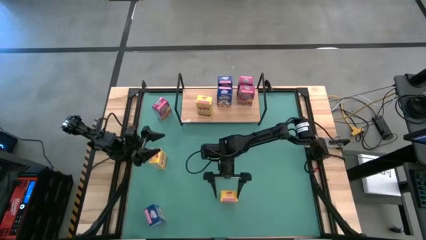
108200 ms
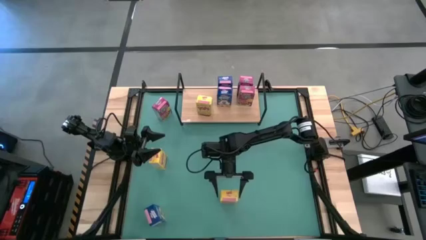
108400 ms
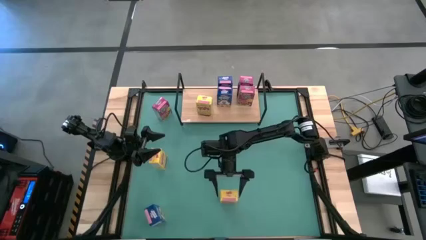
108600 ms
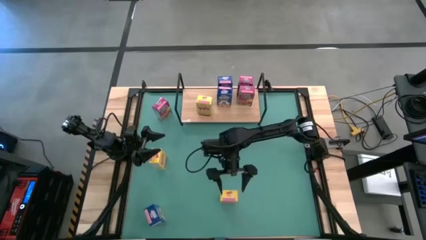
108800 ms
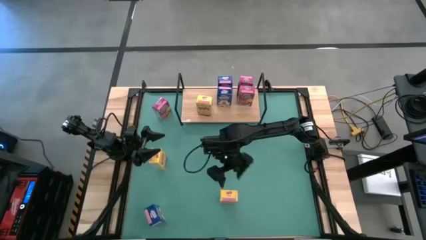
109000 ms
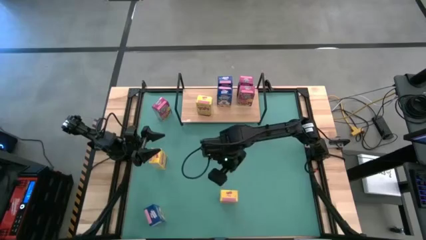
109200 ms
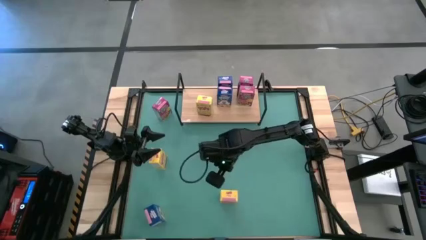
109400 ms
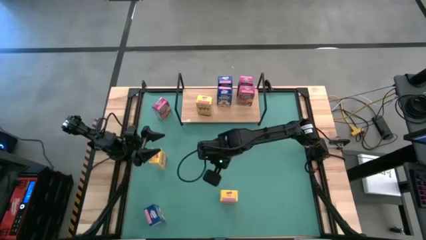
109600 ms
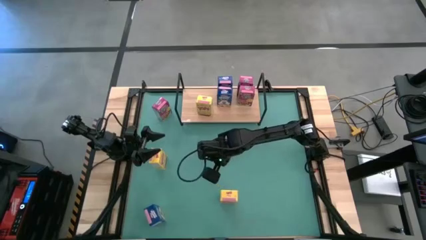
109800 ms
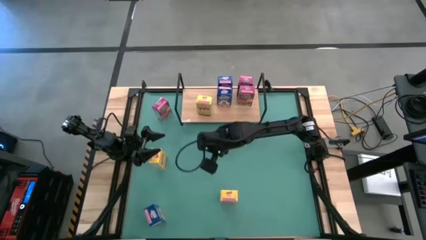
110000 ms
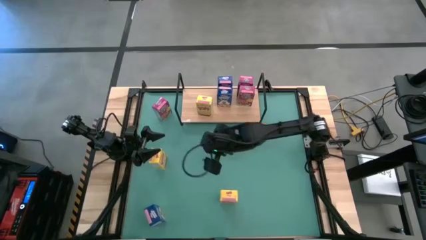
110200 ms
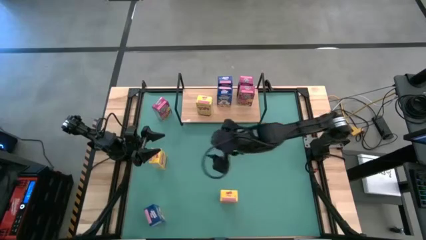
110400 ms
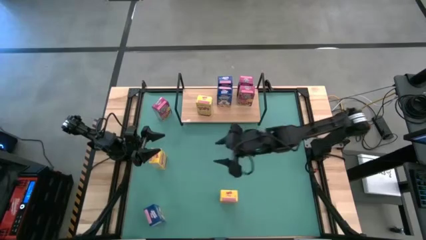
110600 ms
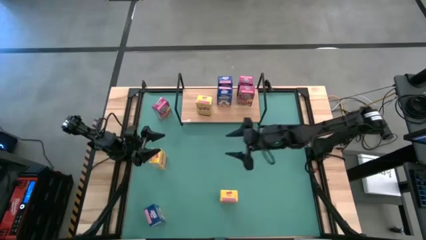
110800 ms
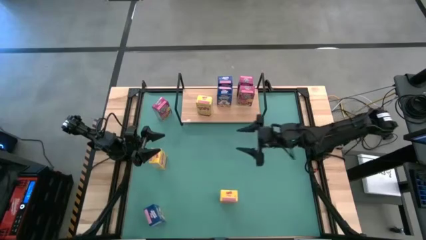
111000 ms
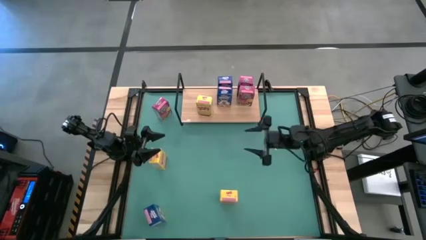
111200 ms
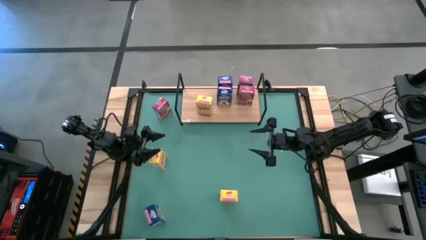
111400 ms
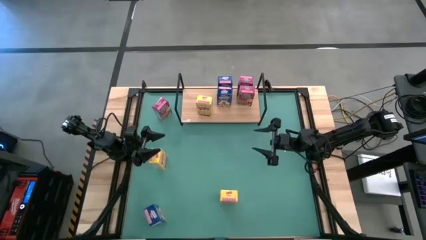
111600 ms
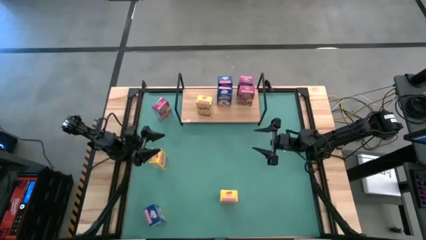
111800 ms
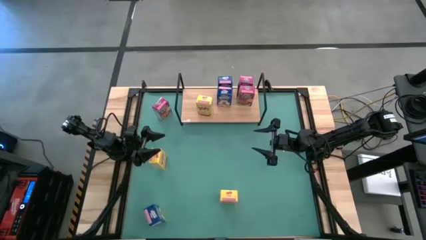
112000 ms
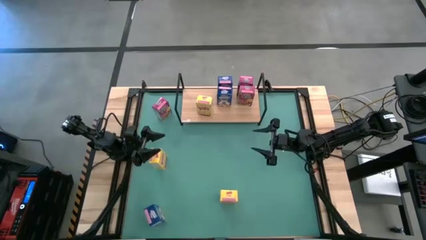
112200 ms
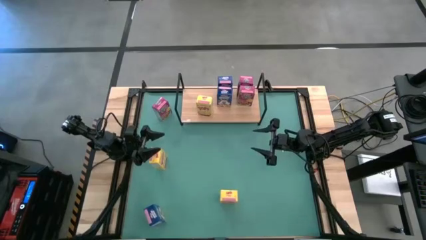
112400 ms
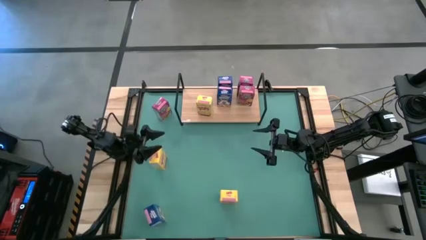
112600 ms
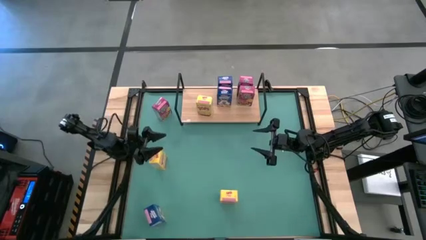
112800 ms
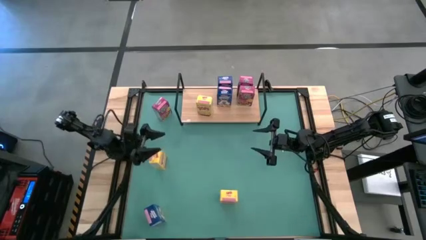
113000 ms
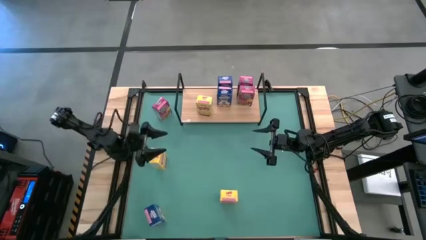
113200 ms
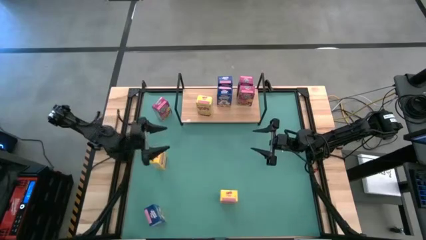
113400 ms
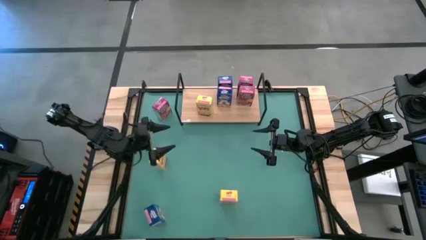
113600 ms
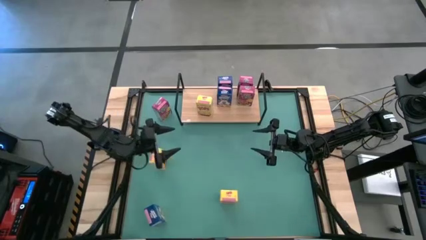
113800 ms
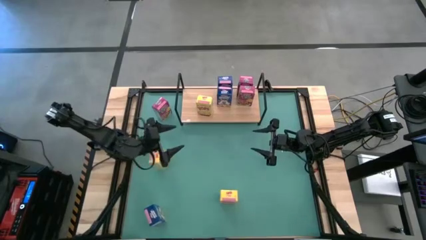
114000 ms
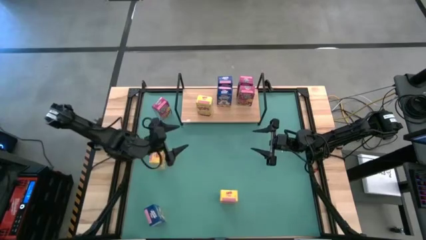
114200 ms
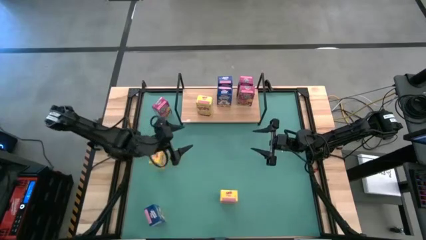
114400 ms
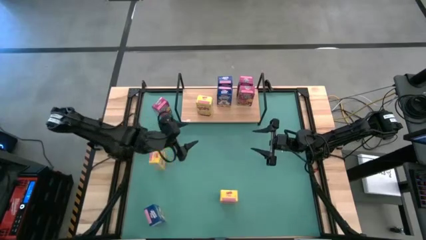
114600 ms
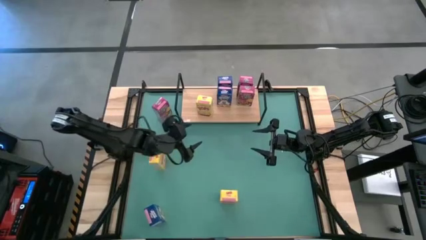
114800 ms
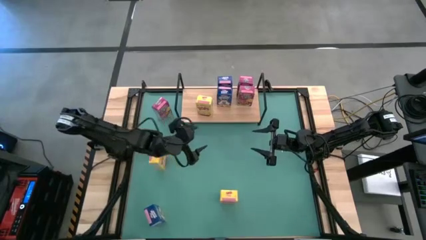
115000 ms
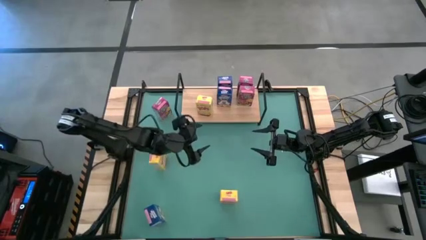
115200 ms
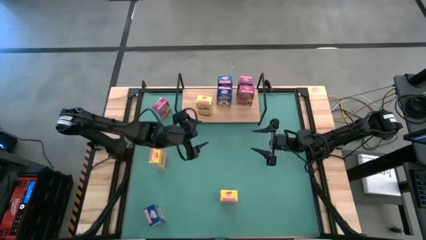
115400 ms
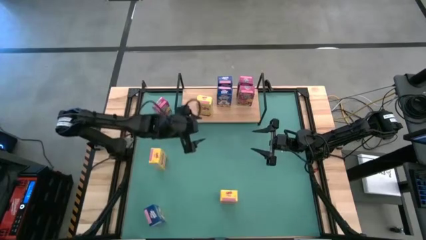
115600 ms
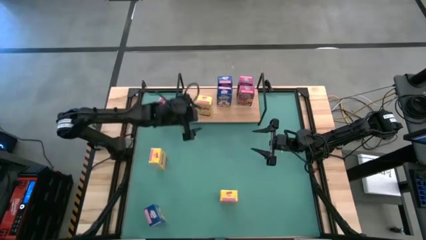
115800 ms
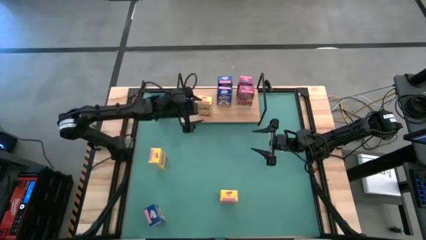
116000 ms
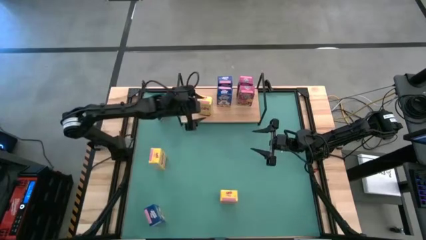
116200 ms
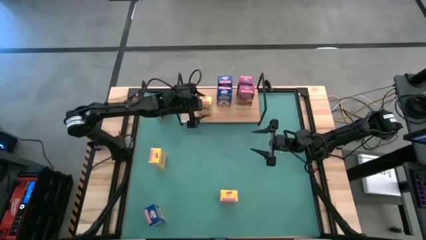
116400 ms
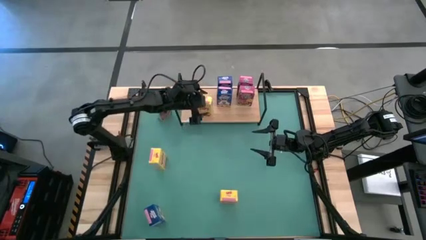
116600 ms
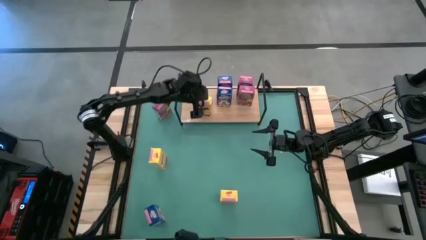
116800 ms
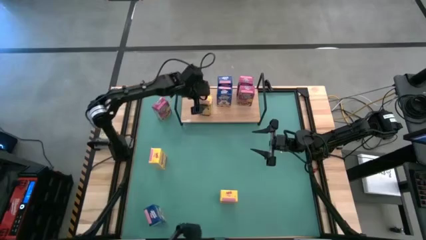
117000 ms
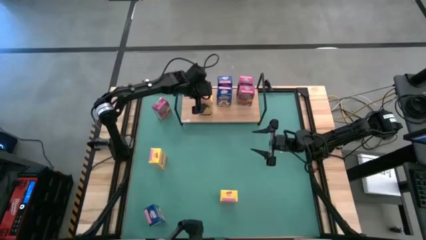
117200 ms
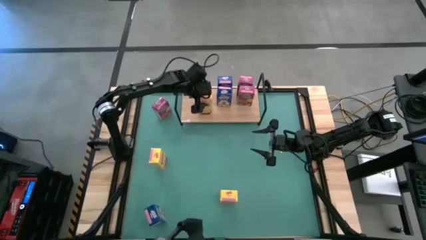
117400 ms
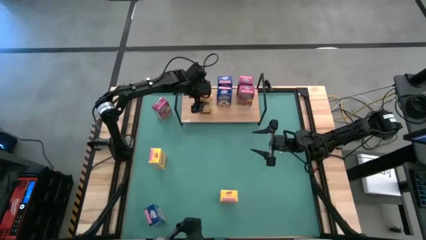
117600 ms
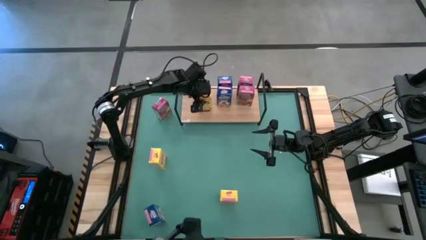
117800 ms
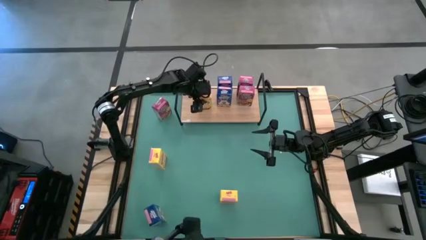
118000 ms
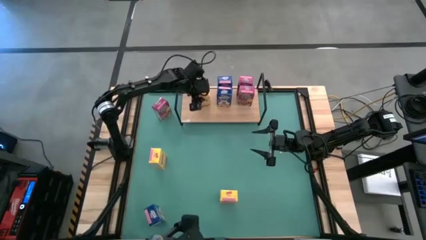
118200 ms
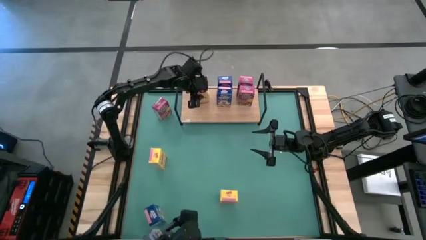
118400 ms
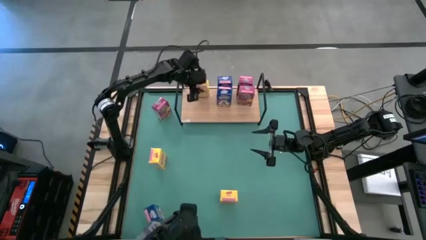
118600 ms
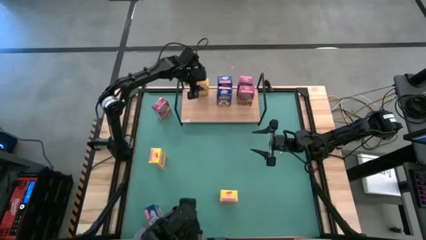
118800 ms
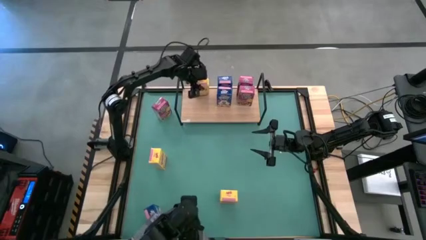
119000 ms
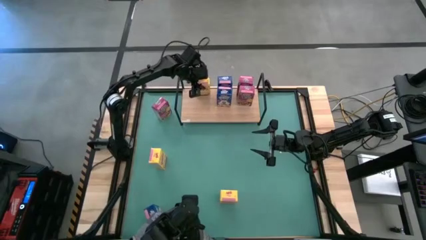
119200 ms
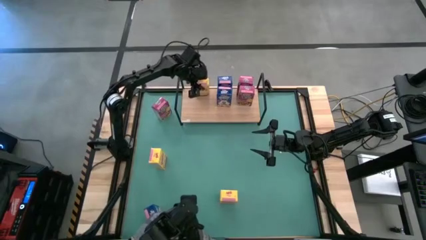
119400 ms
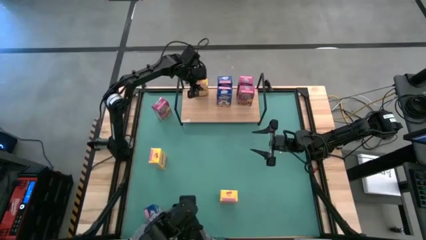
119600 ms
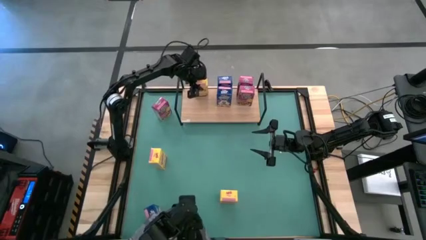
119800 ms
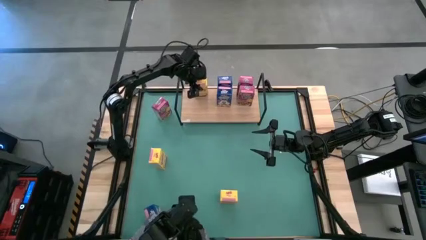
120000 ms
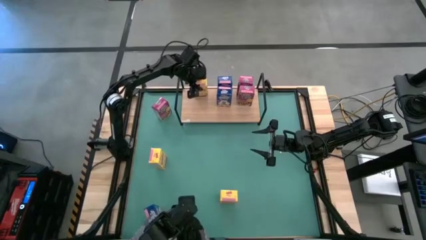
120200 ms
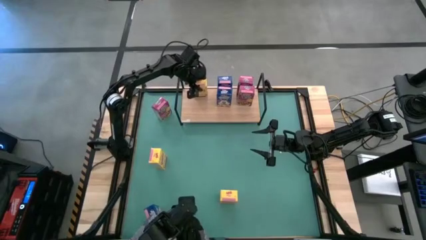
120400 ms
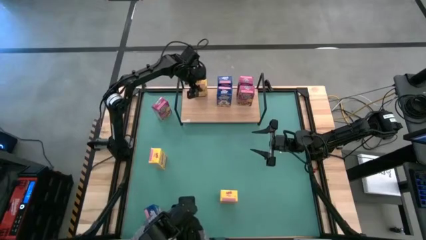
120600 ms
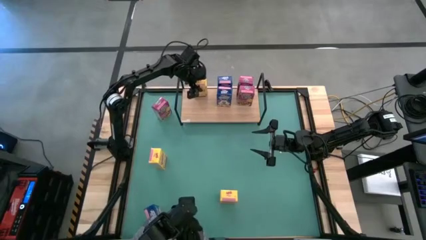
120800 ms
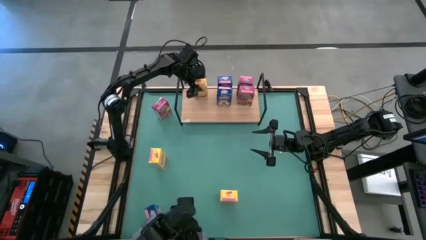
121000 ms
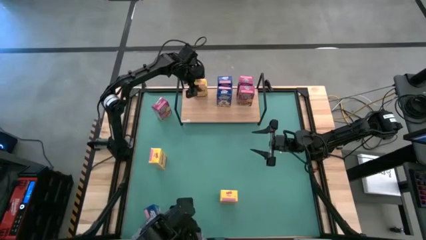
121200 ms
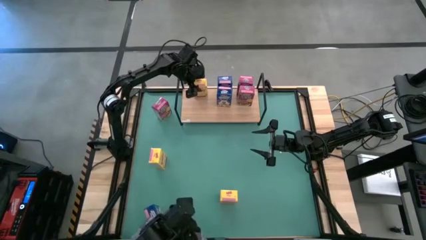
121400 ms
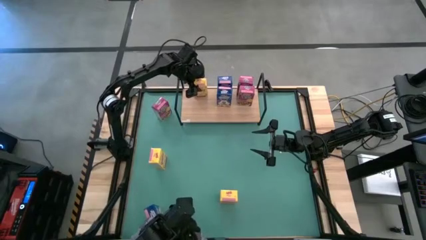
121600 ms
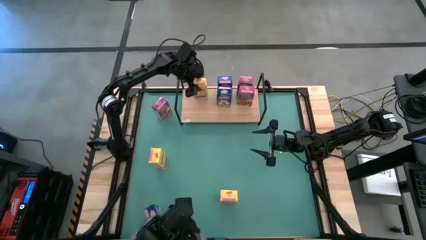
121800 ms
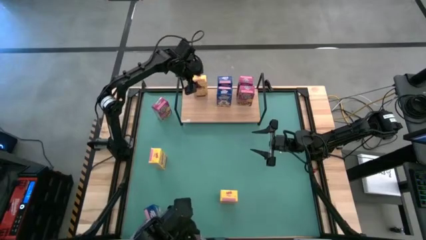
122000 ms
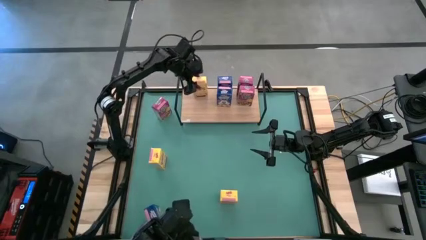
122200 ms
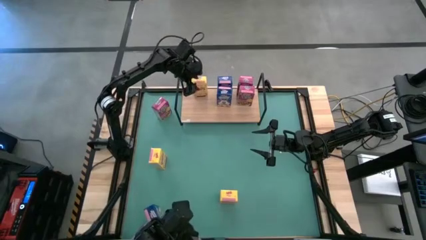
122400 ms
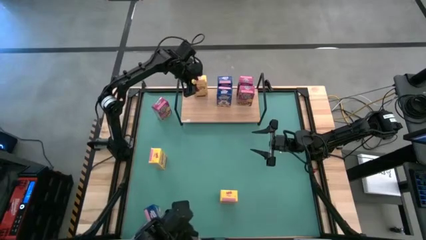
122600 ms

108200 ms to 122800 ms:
Task: Stack cereal on shelf
Adjust the yellow cereal box on the shelf

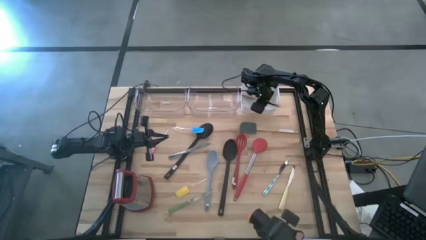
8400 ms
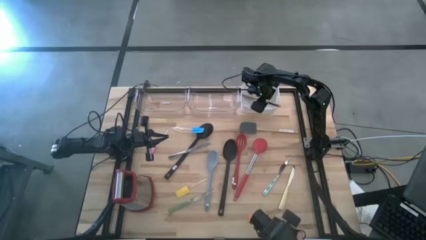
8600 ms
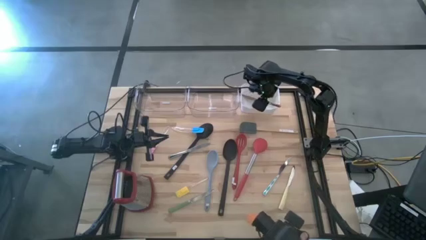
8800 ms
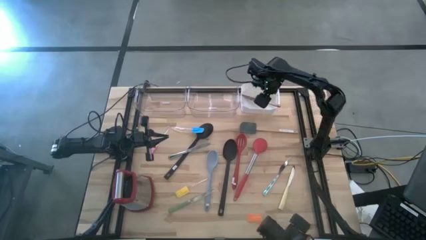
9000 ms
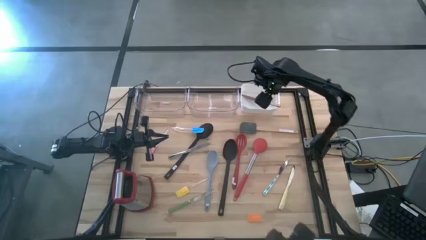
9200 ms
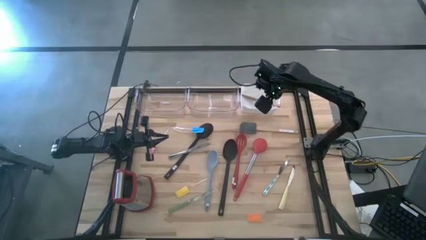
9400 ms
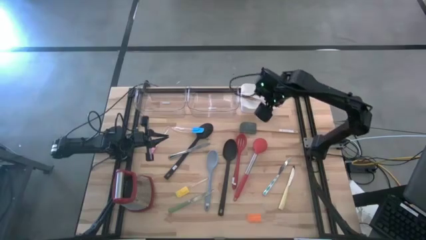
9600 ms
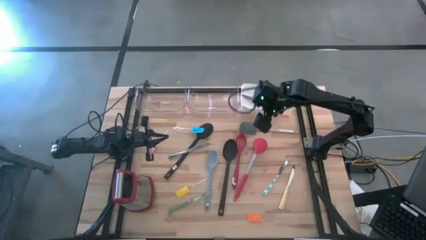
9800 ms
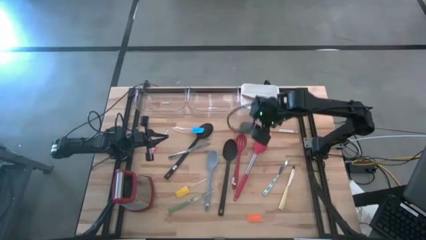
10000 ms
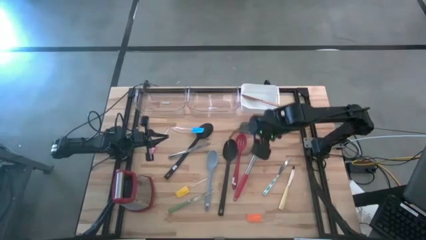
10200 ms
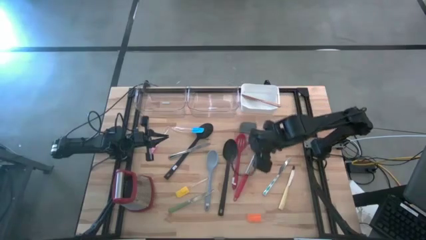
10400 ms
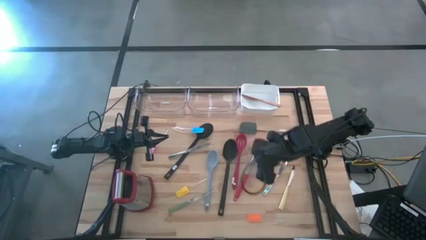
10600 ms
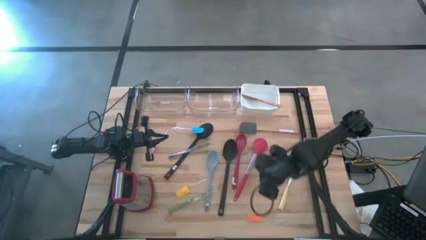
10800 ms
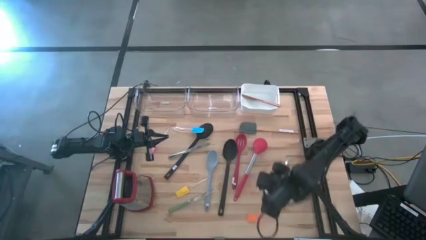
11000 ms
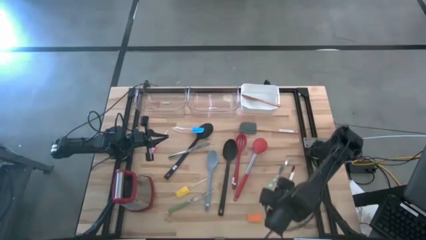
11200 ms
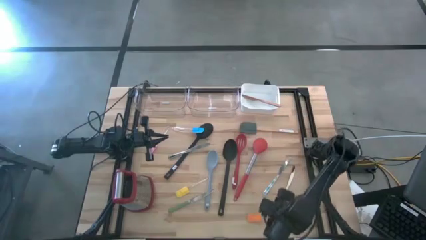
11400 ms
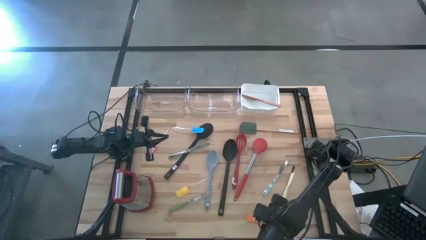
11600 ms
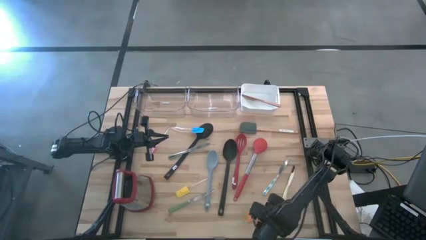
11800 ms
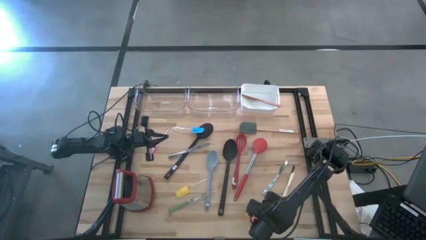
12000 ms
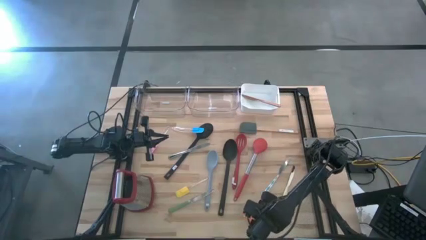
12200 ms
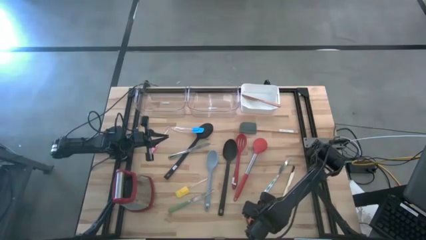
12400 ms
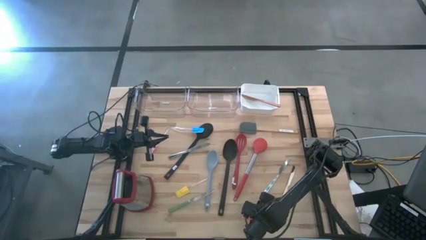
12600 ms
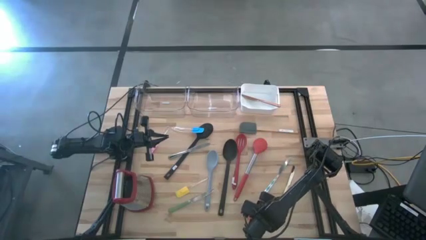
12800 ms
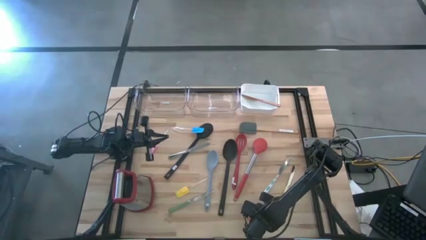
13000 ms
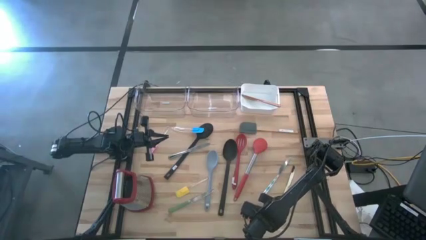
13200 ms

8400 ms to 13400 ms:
Task: Pick & Place Kitchen Items
Put the orange spatula into the right transparent bin
